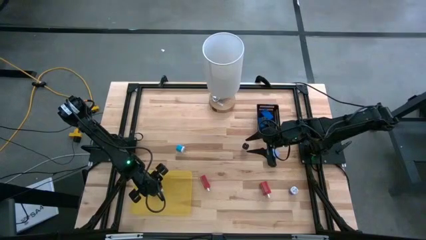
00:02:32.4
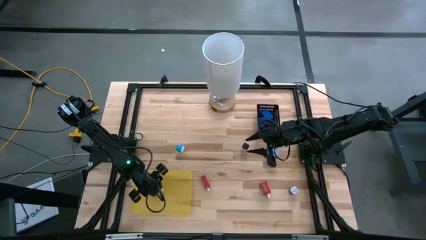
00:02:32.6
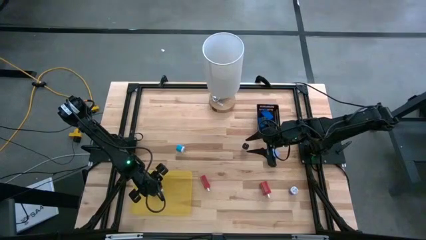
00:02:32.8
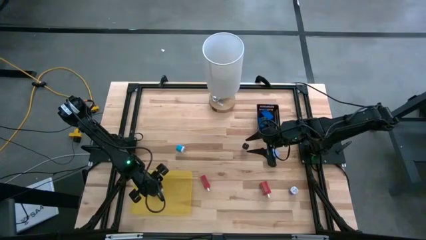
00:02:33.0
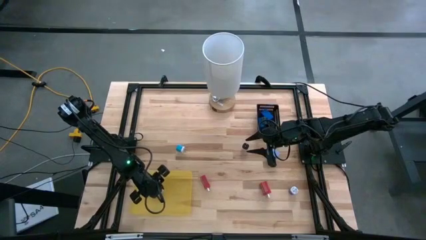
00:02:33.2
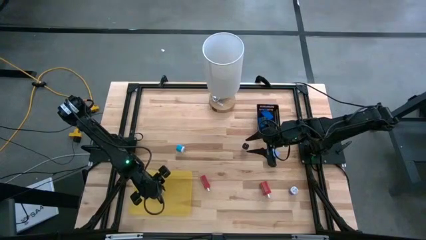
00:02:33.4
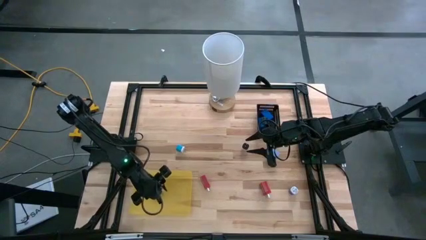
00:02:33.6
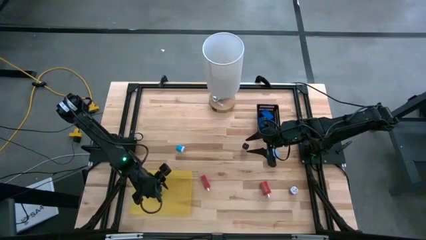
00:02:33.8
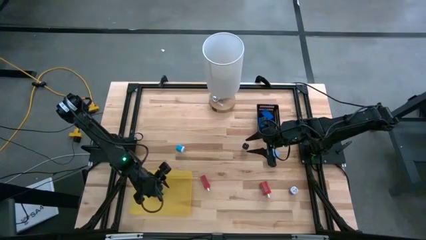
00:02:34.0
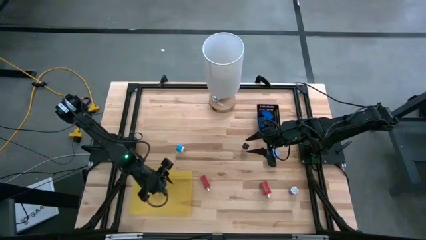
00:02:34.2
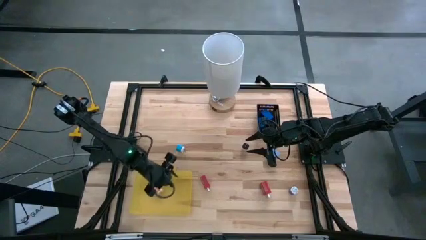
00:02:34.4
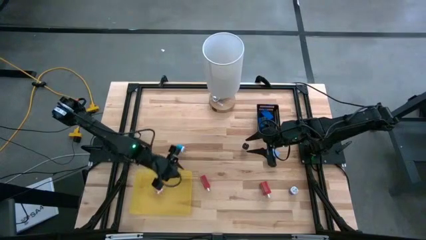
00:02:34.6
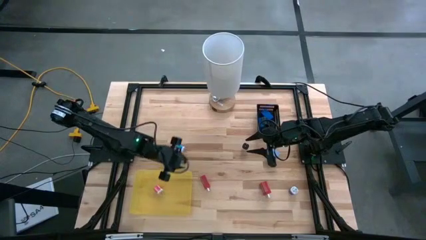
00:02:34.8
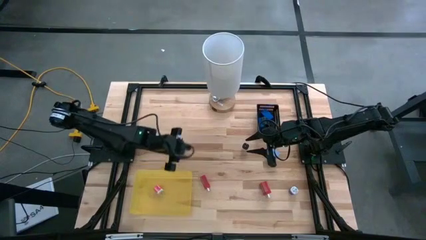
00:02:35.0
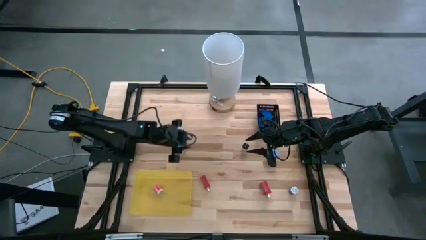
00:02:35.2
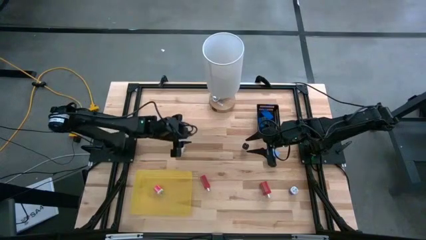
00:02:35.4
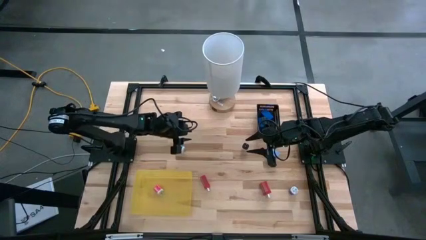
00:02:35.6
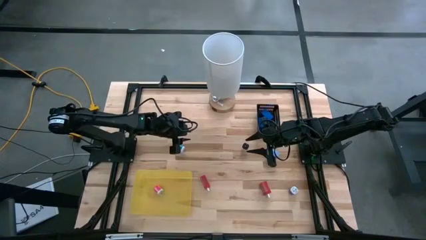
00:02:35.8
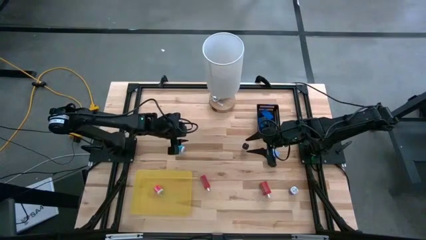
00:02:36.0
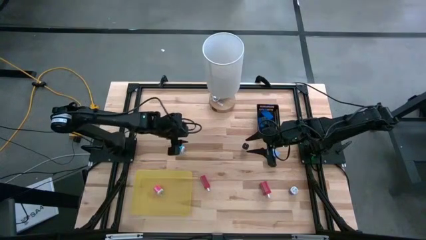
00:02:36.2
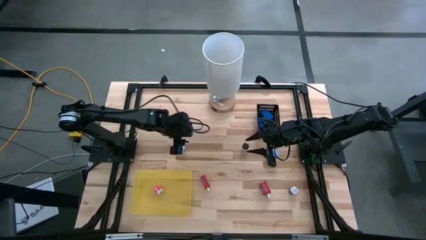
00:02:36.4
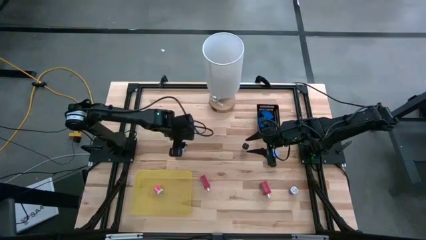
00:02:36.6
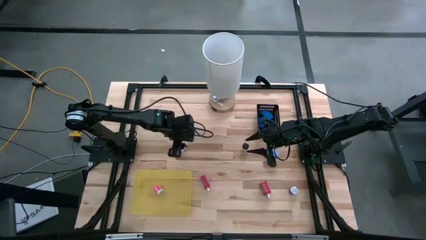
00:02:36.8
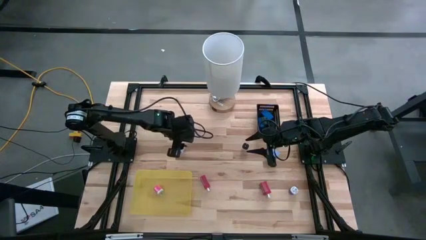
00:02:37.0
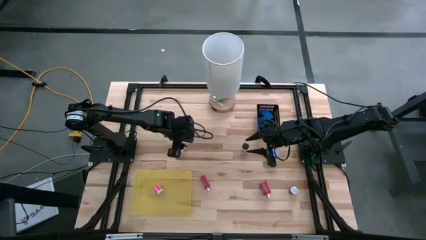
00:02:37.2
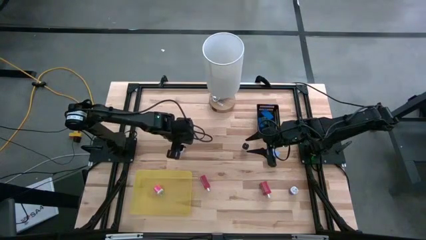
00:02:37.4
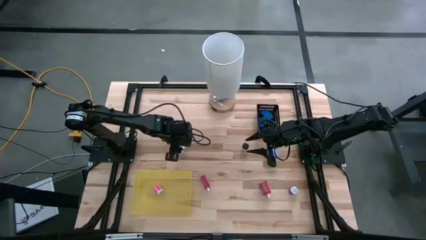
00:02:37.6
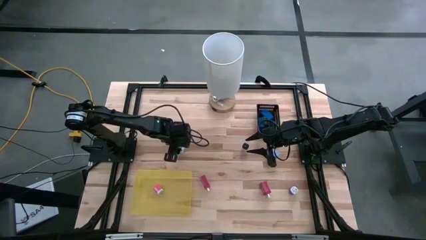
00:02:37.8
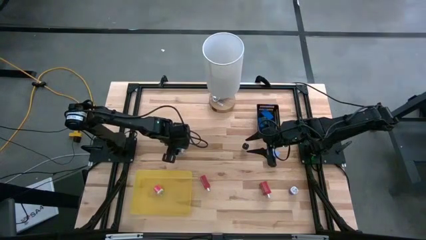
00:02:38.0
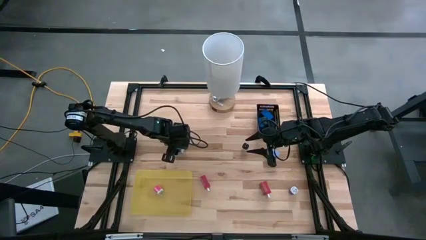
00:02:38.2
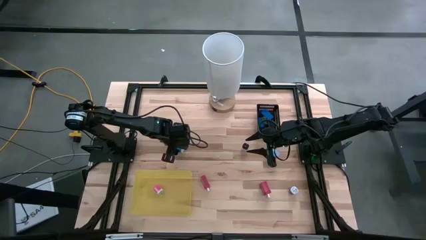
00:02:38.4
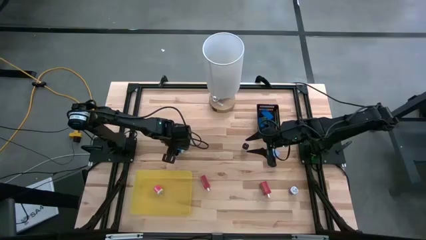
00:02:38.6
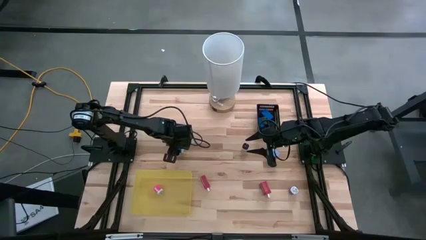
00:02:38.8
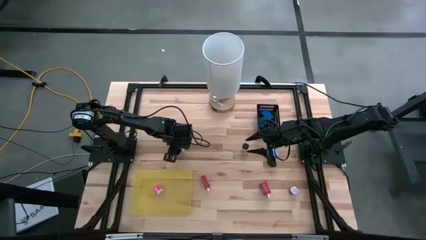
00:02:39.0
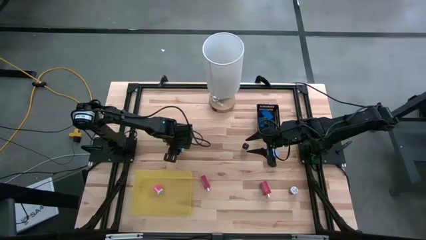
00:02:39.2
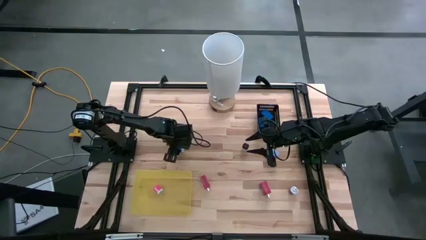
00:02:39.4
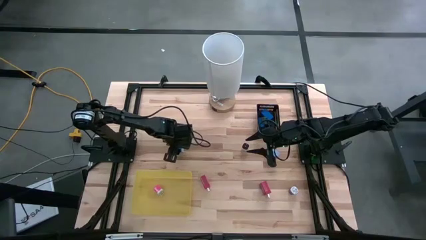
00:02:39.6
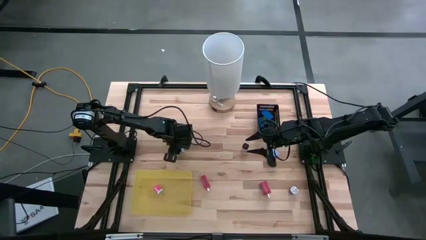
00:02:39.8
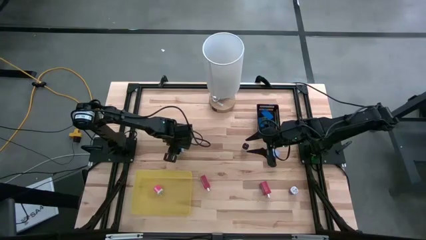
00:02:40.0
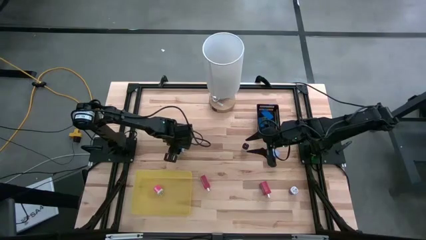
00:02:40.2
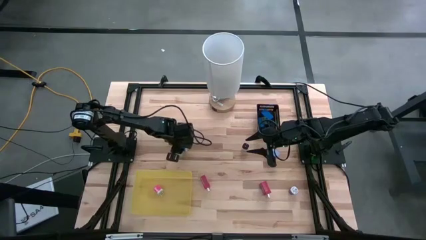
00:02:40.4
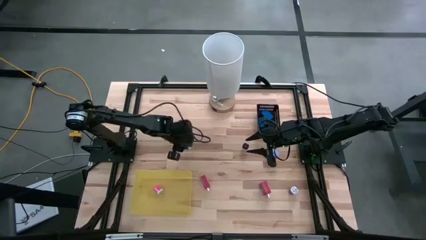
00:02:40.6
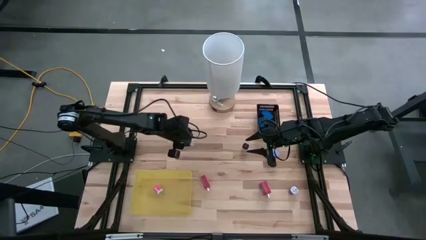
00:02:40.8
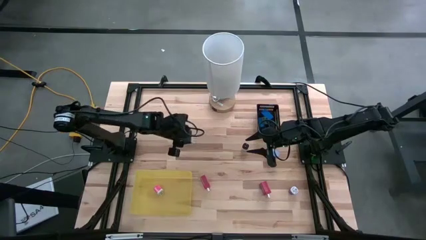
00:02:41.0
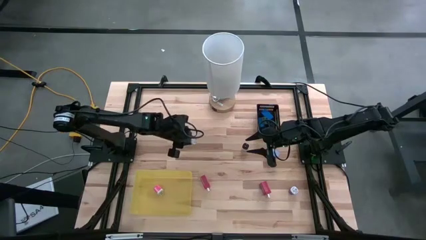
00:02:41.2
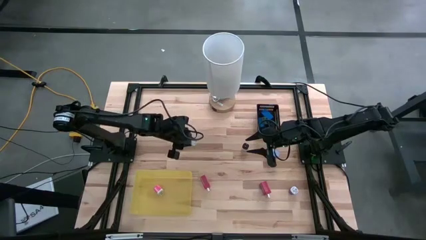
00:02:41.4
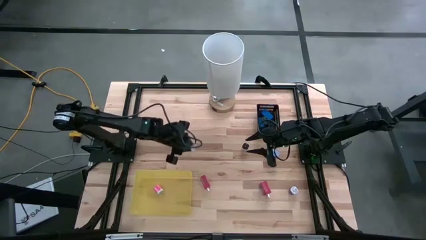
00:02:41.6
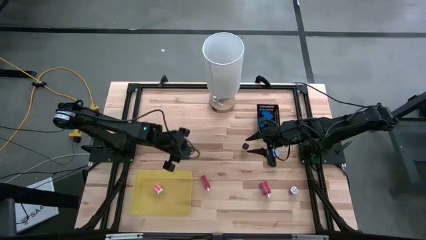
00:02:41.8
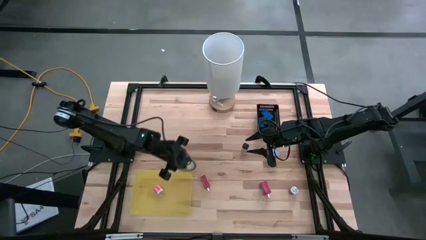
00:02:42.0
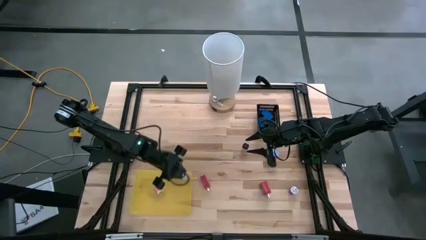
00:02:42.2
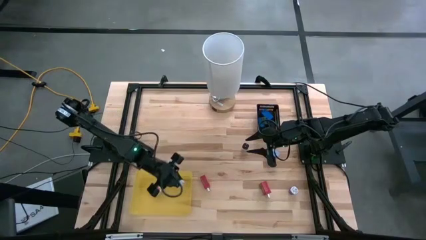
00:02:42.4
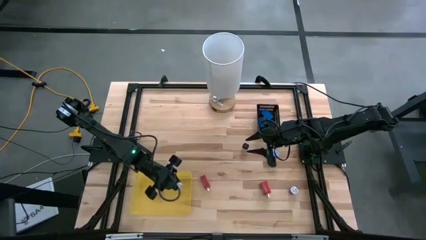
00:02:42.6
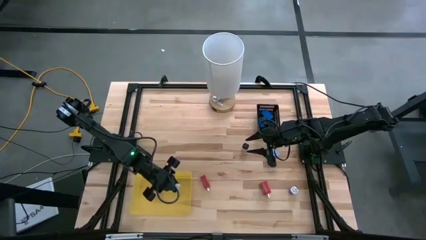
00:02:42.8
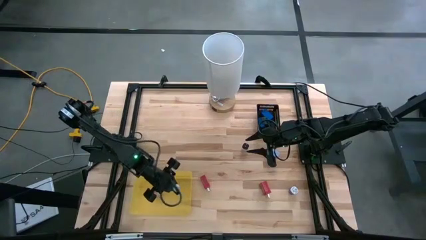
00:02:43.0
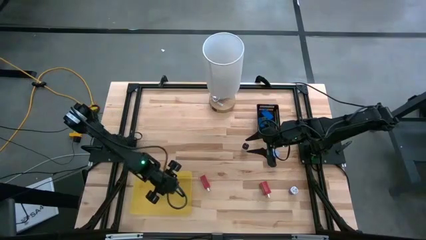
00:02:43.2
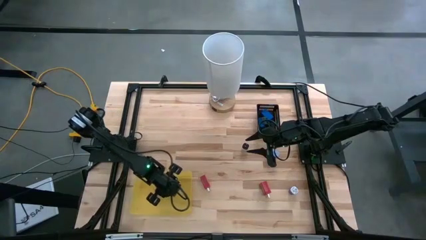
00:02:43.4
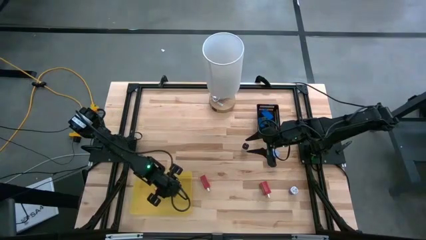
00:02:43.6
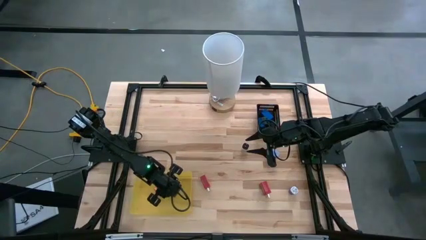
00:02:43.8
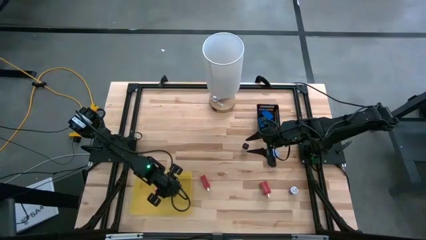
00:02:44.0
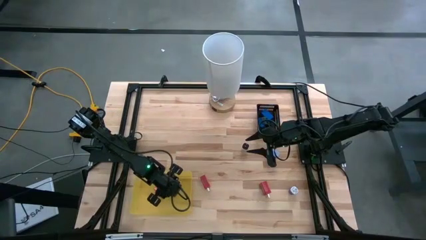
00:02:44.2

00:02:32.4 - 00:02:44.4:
Task: Pick & Place Office items
Put the blue charger adapter into the yellow bin

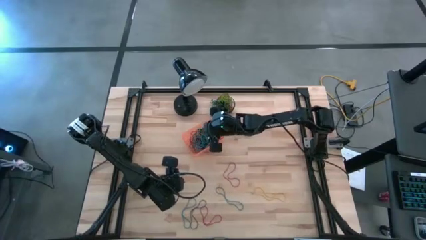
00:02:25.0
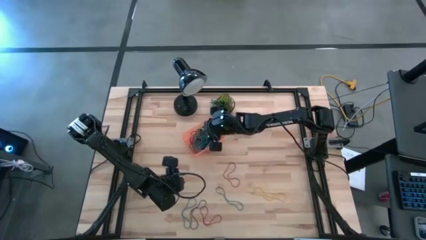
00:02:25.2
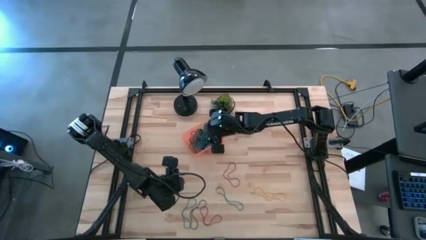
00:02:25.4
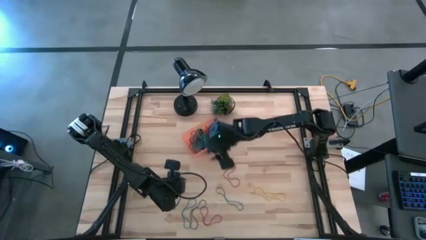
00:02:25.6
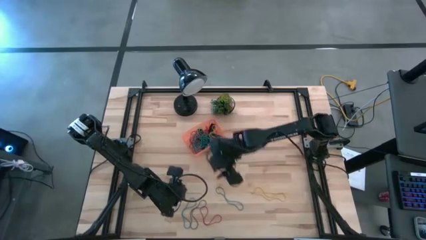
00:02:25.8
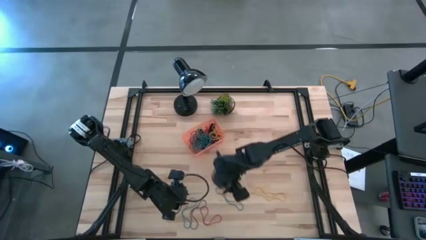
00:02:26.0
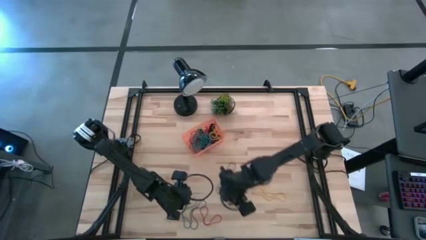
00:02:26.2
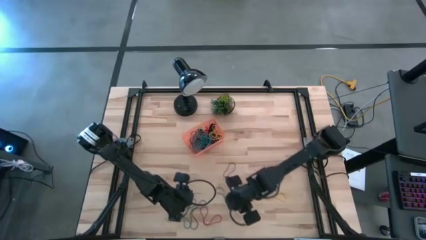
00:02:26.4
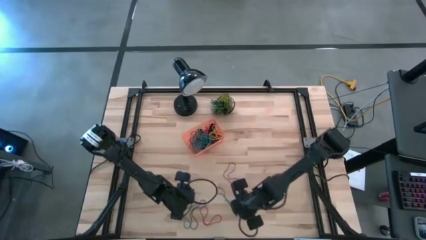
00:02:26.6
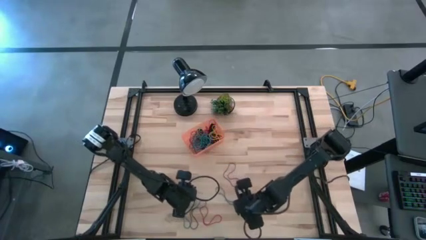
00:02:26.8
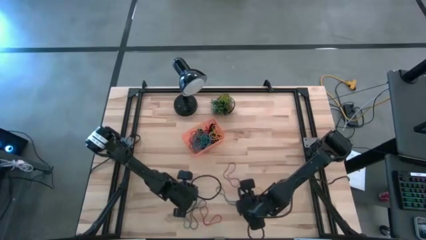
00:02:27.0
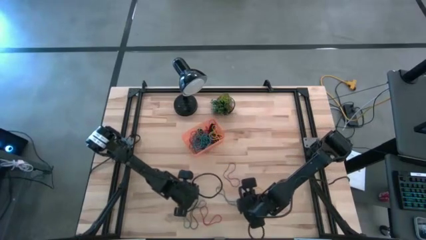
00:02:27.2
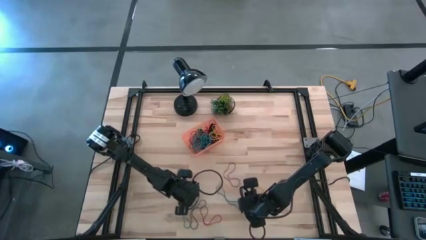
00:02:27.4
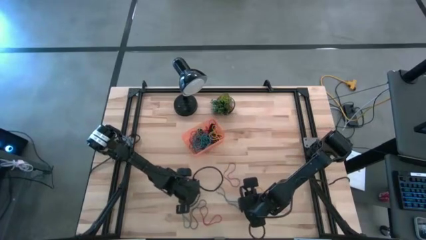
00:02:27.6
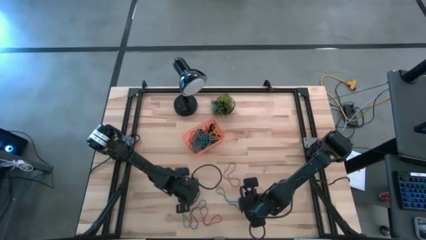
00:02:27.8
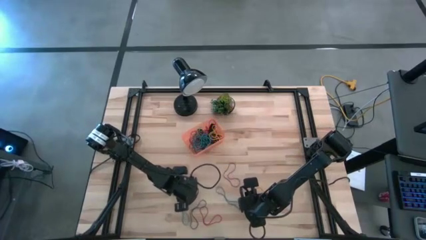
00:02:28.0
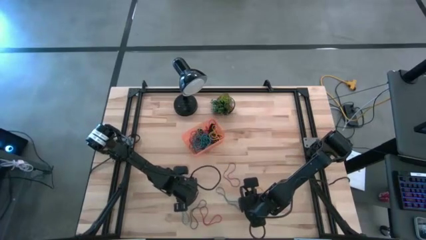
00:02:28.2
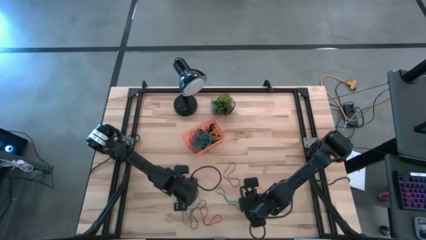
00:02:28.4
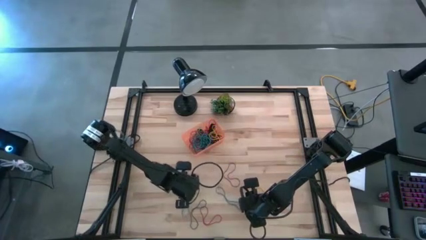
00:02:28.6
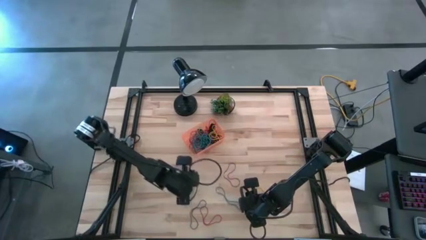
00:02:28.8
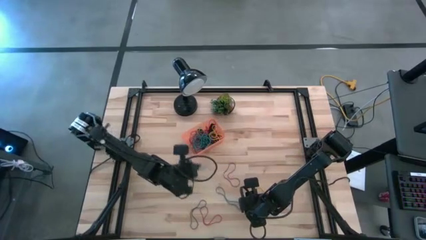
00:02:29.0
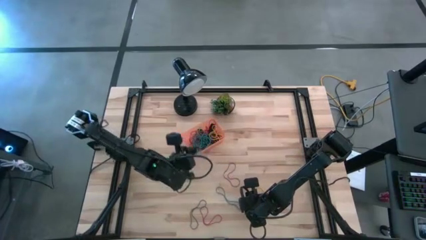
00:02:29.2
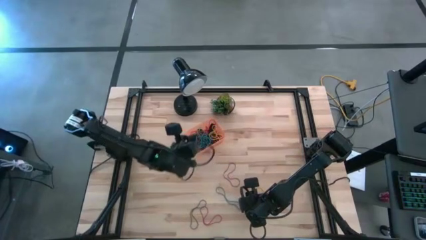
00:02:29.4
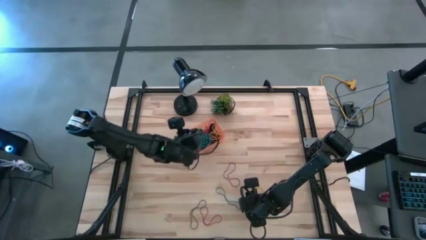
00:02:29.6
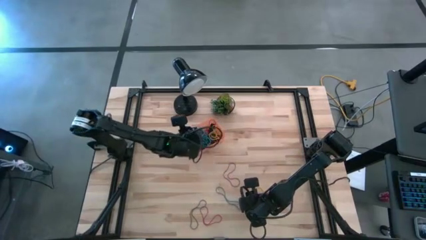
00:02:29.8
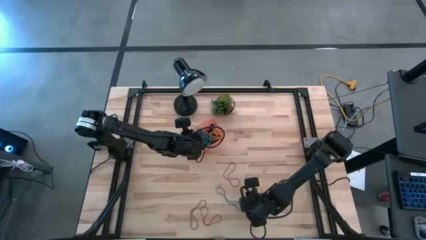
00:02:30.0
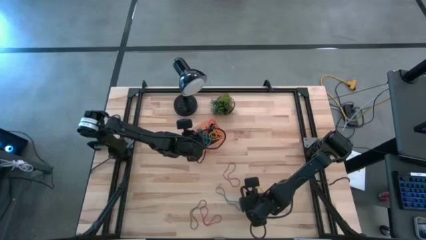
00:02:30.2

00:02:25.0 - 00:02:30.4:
Task: Pick and place rubber bands into bin
Put the blue rubberband into the orange bin
